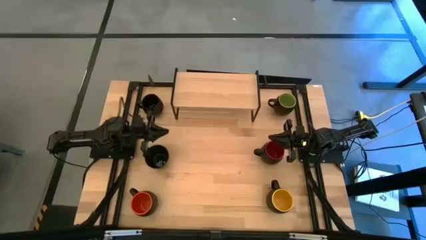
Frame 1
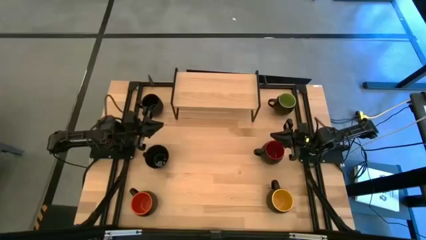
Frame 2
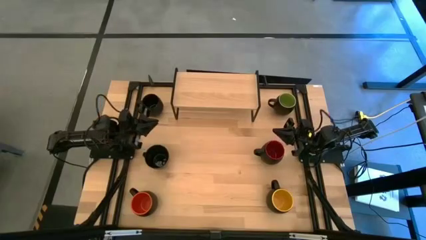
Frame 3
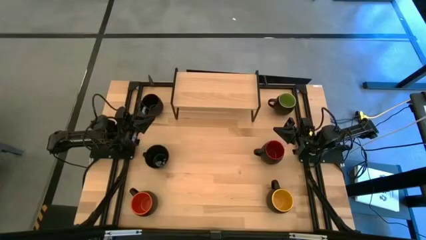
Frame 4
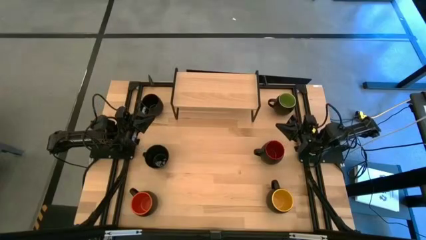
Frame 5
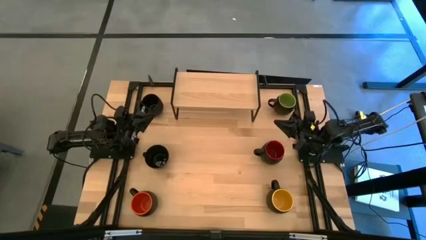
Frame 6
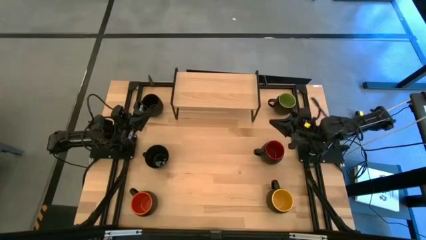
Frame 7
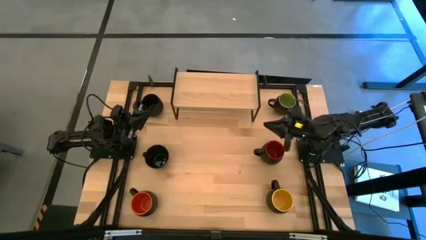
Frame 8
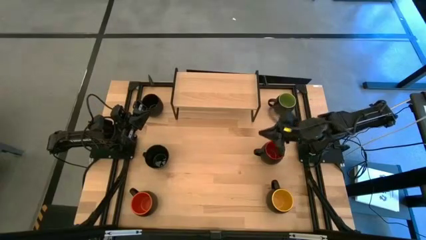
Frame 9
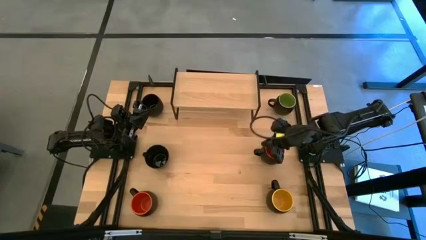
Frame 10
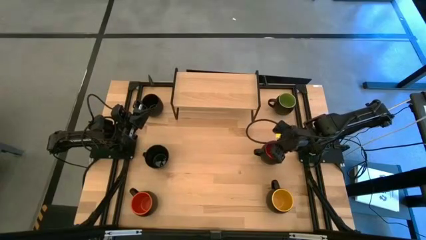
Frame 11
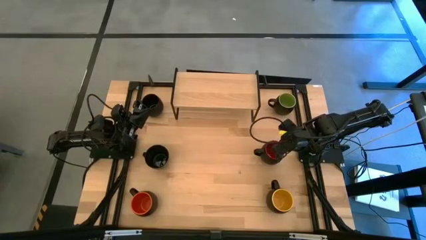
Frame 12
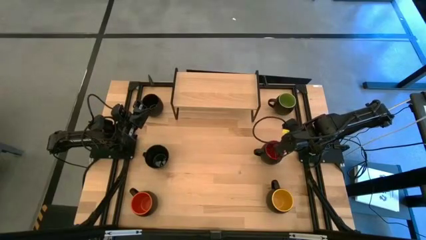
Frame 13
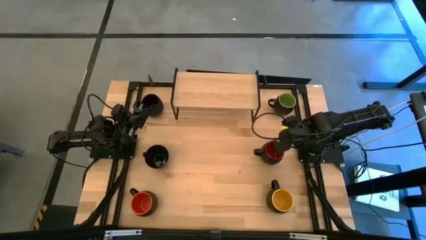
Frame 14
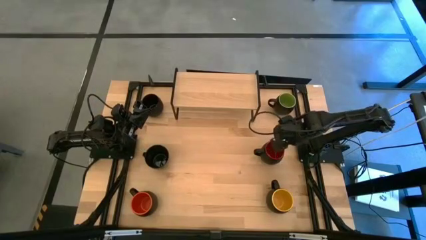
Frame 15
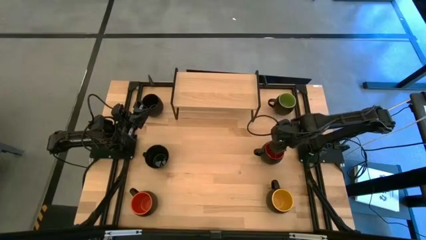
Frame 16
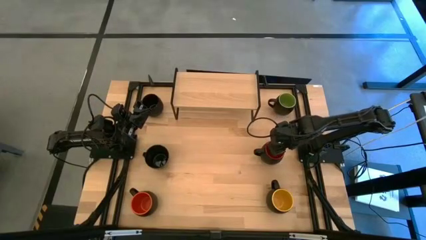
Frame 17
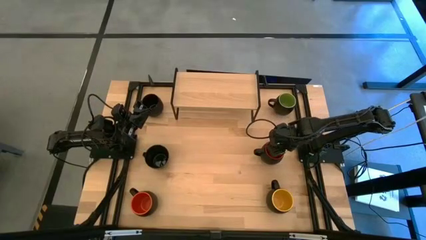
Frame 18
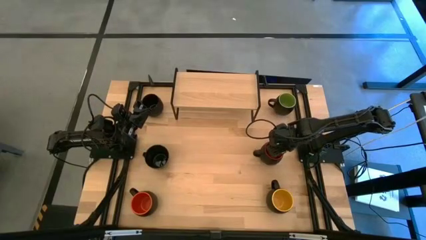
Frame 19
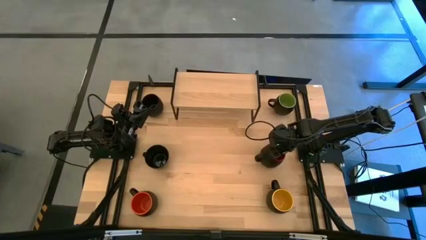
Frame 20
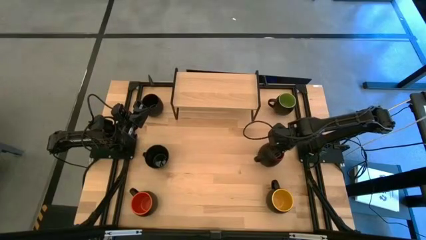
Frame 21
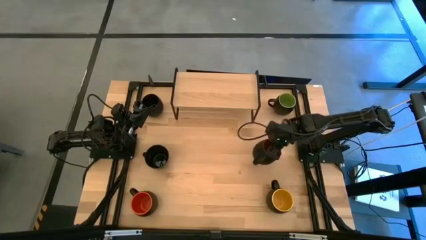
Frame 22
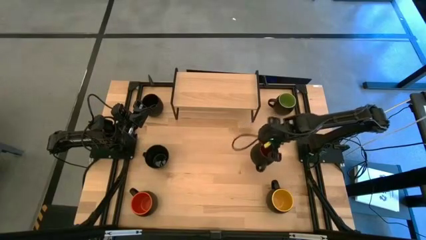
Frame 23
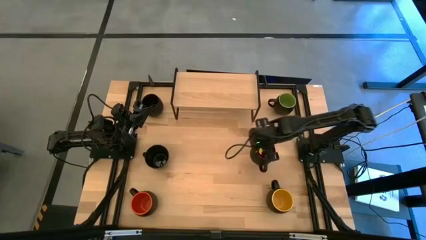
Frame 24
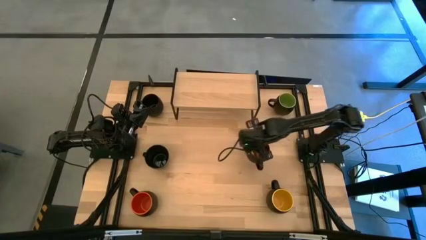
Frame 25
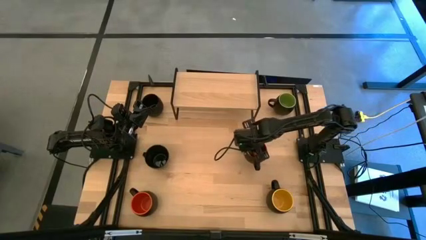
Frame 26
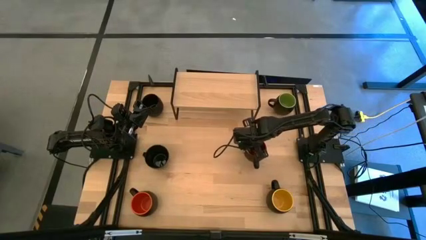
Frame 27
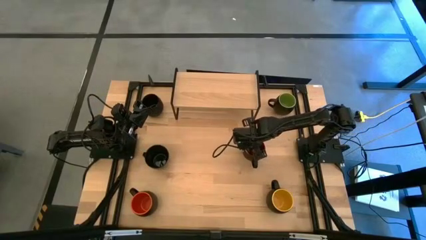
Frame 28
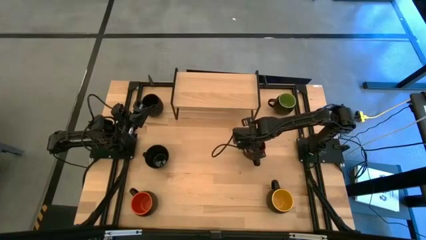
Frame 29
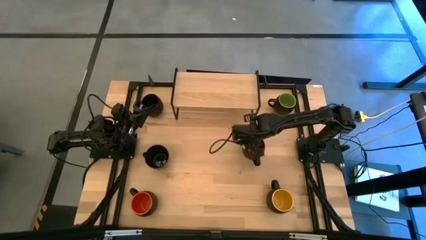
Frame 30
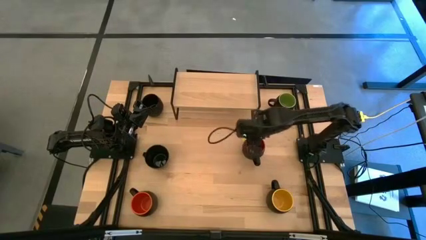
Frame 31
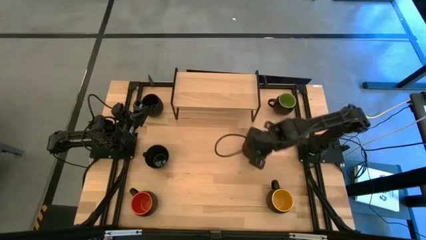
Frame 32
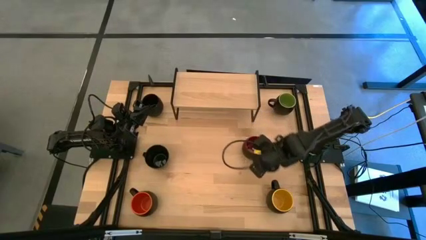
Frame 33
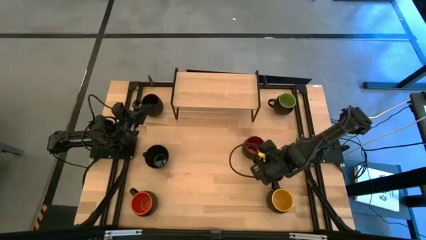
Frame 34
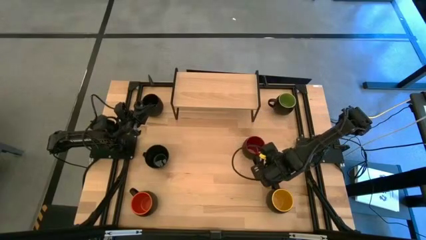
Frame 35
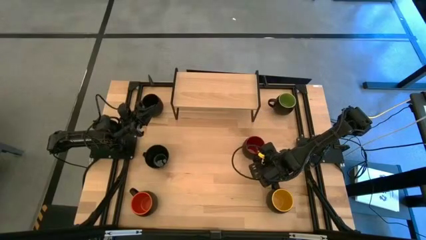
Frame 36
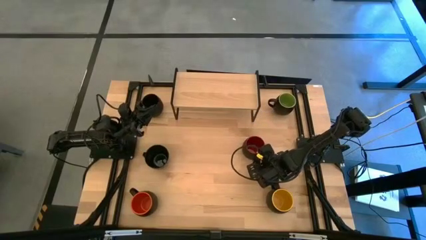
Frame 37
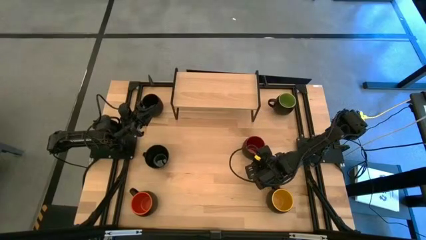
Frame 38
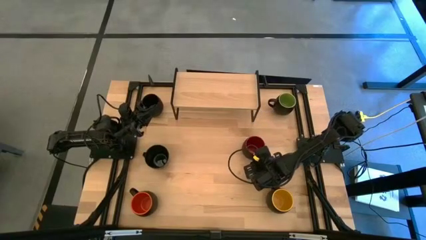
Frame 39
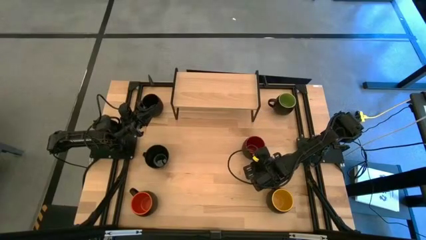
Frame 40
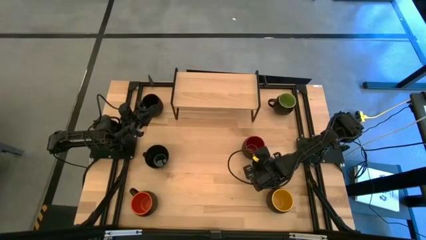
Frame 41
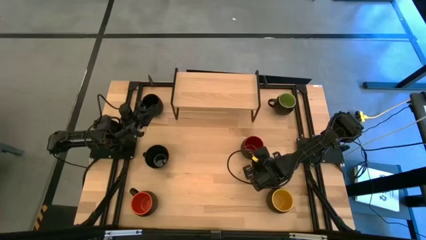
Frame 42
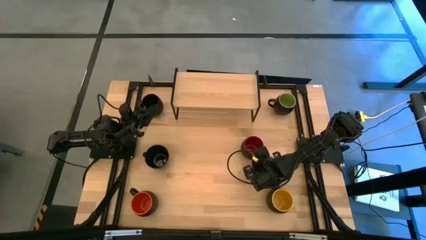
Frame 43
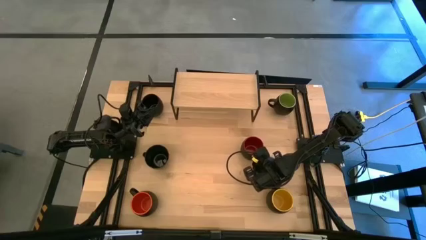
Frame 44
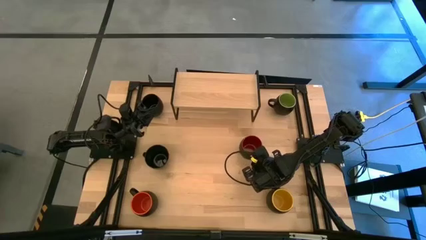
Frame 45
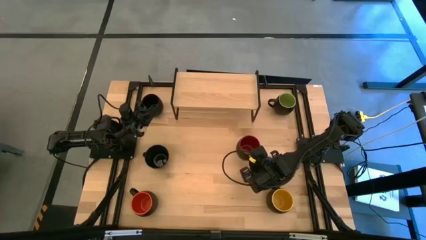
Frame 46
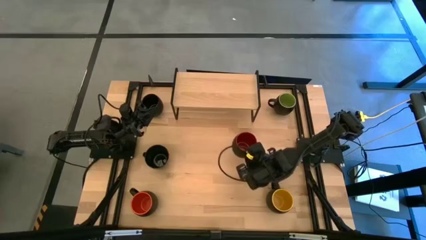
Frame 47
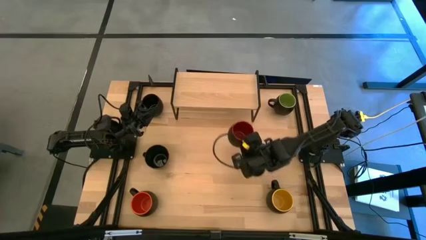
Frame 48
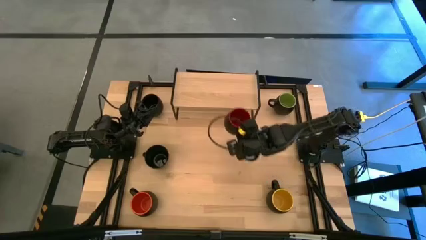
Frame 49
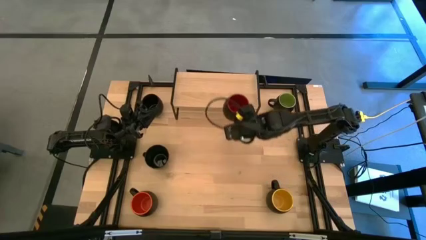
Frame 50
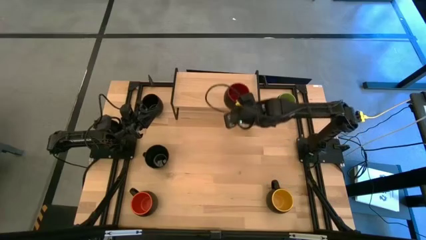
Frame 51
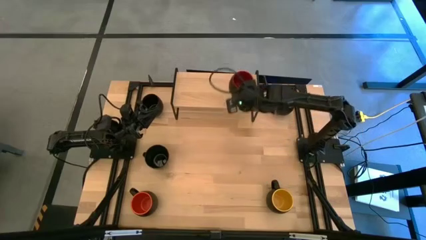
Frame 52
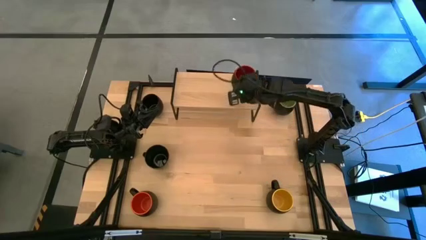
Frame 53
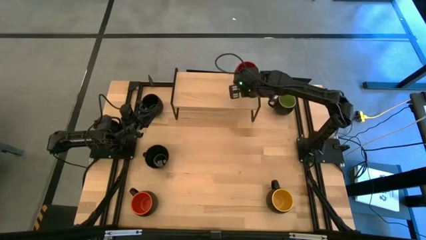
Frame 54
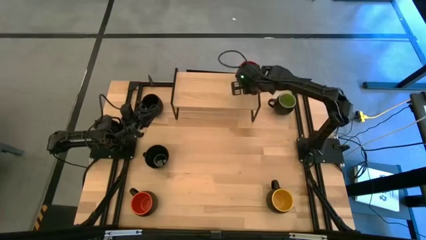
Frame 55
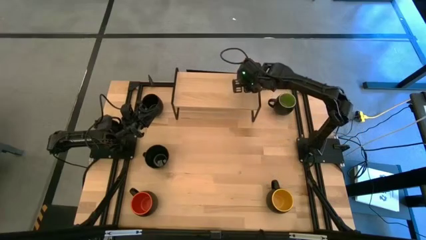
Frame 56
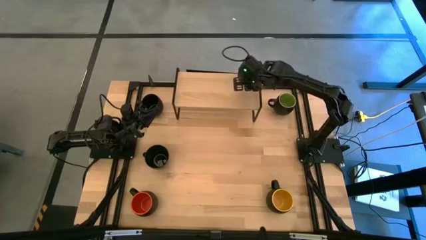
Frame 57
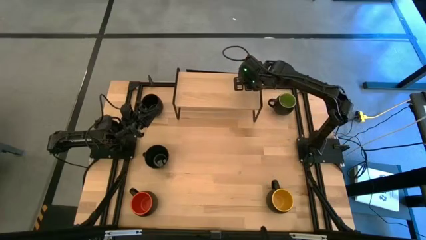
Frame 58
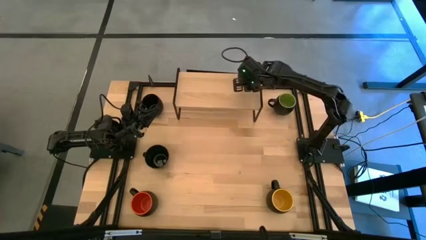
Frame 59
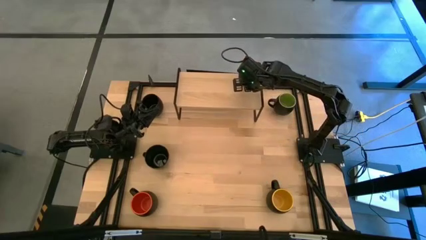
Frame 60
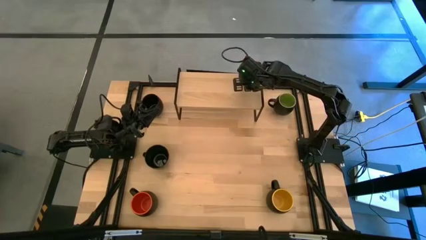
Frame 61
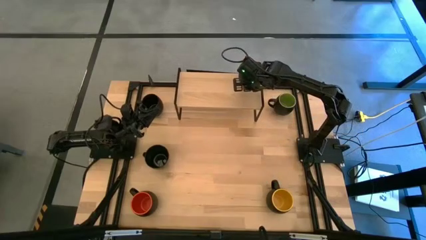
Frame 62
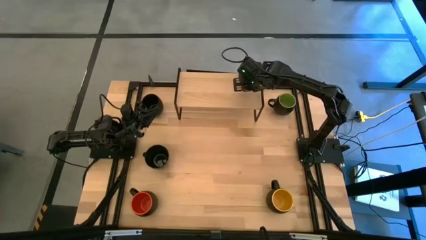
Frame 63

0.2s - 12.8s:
Task: Place coffee mugs
Put the red mug on the shelf
